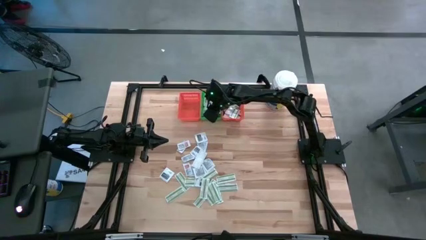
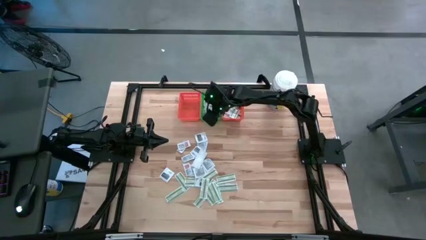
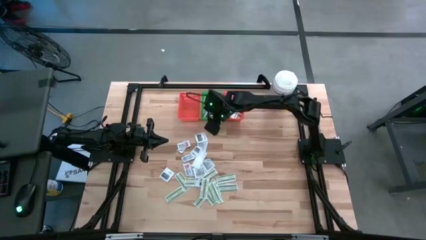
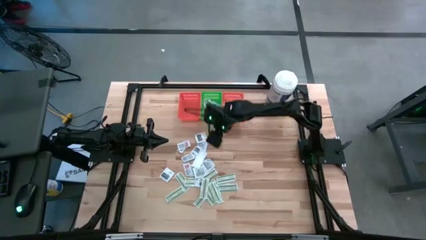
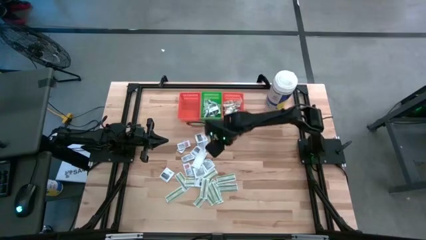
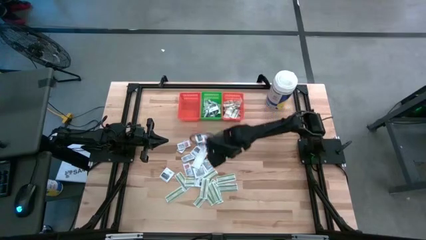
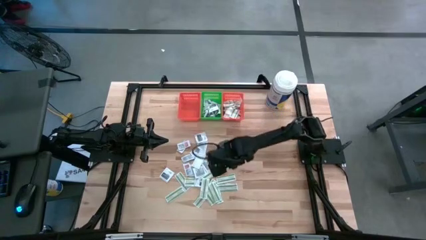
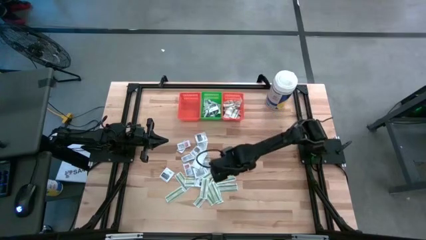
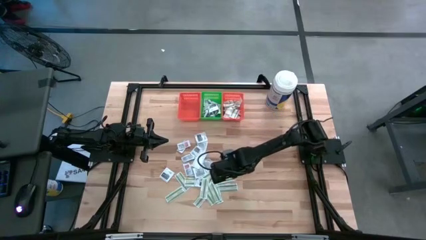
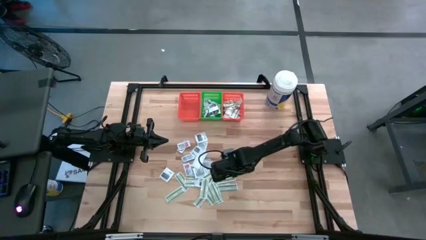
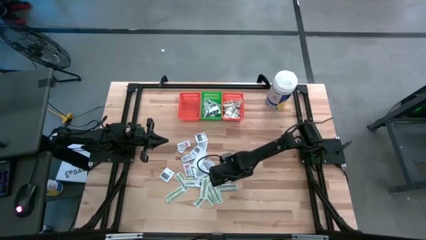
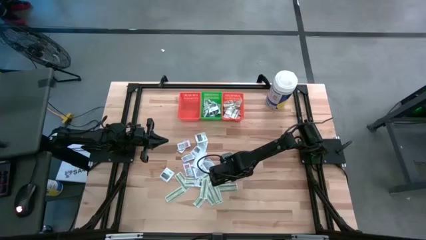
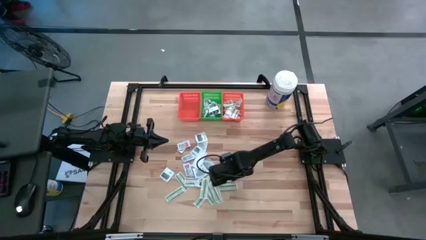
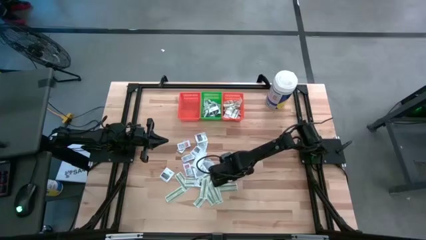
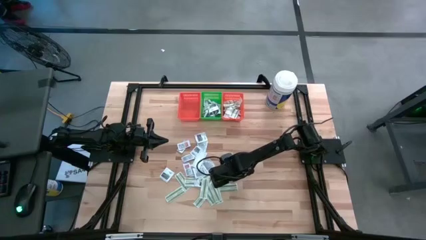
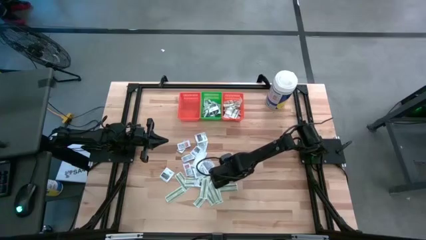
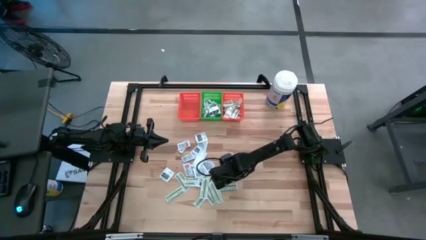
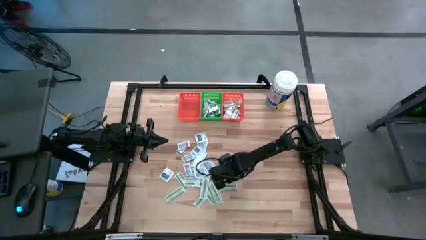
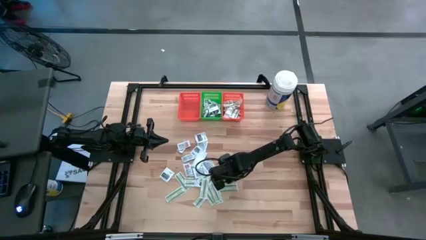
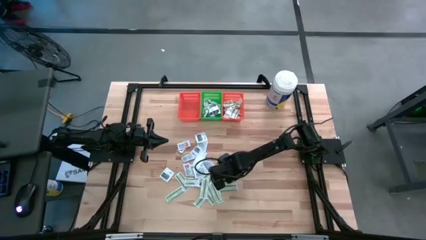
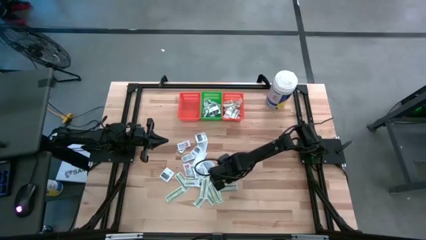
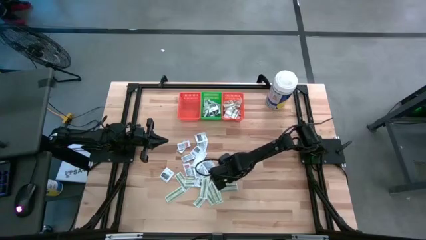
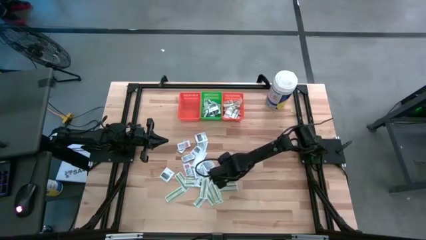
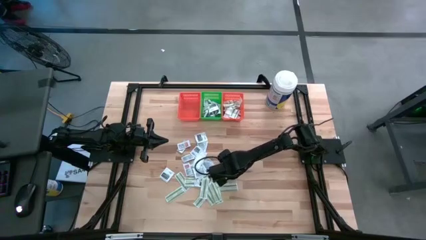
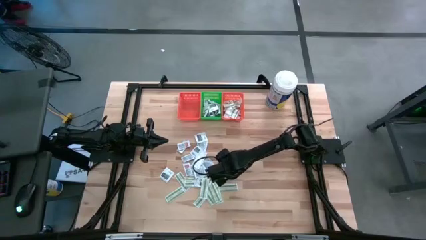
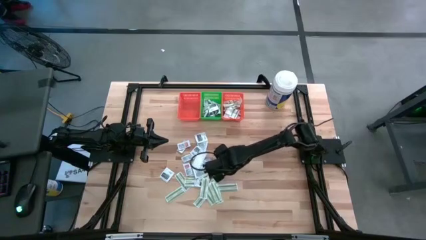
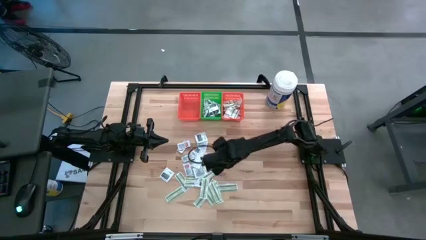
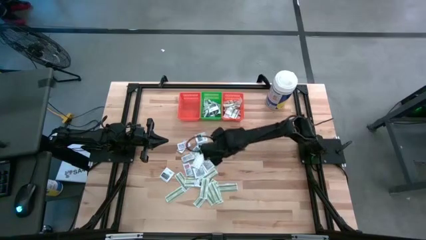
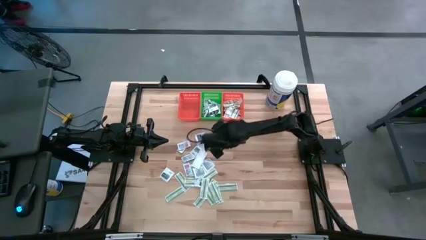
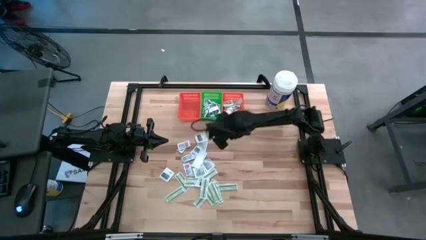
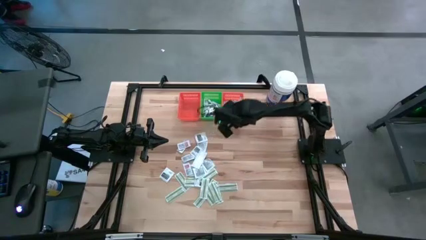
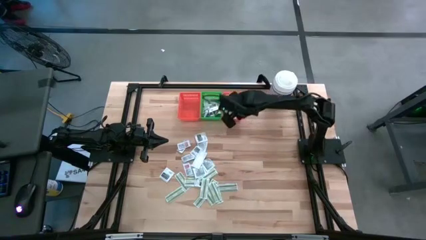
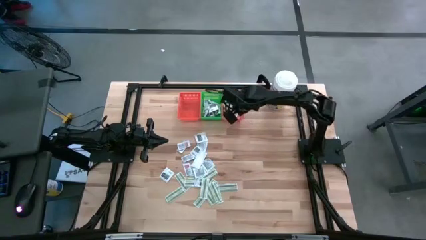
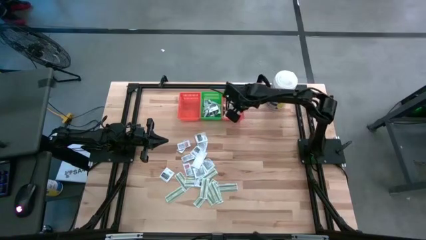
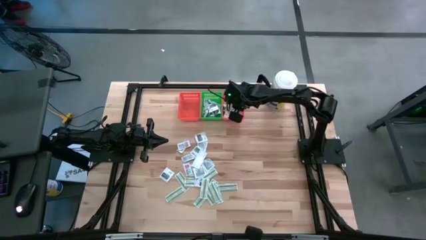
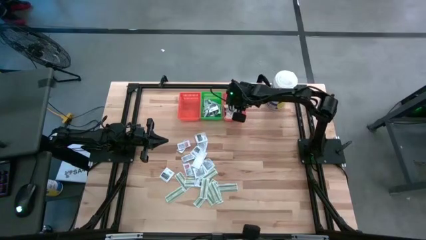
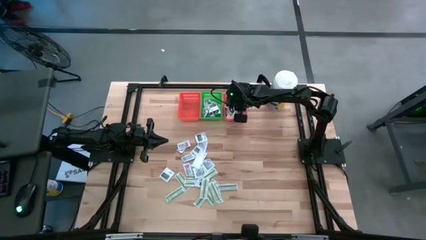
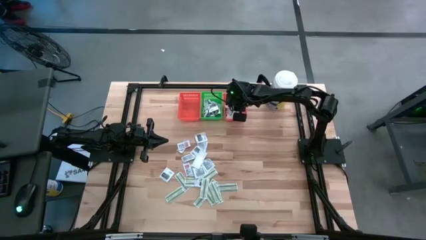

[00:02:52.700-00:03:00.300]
Task: Pick & Place First Aid Supplies
Put the bandage pack into the right orange bin

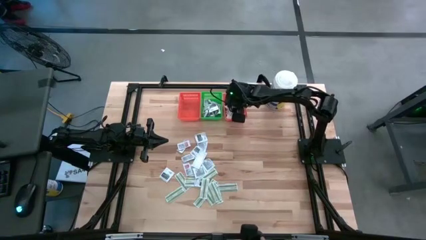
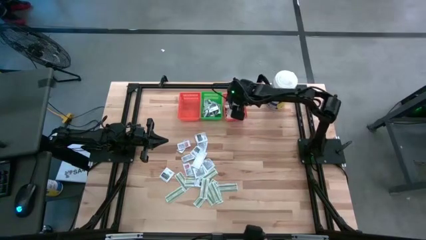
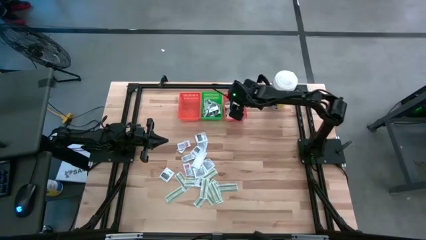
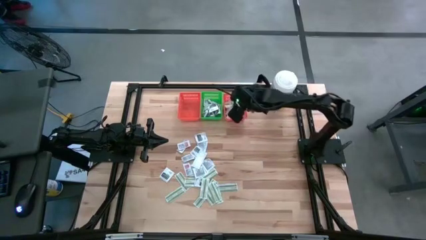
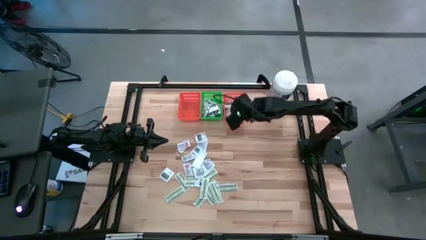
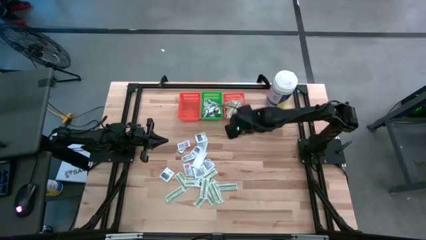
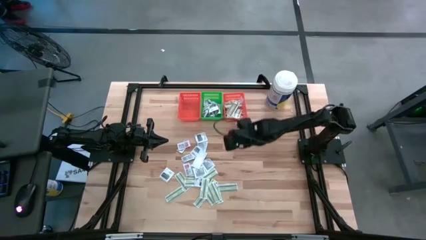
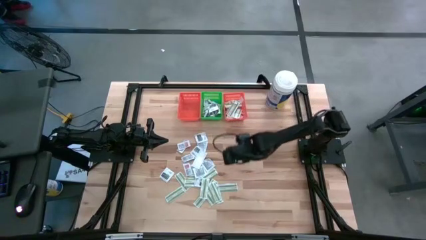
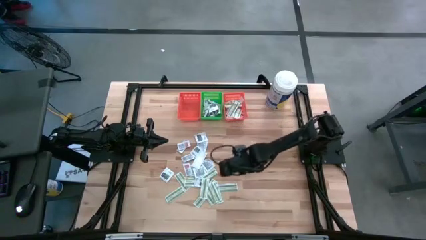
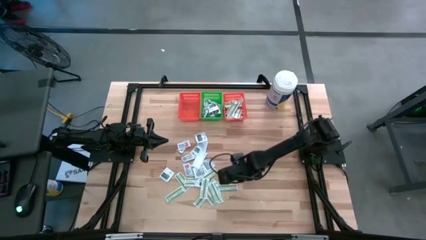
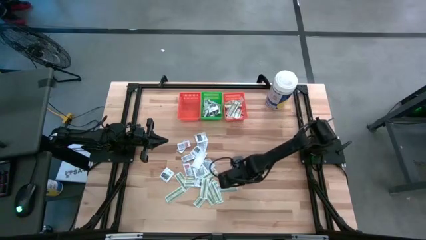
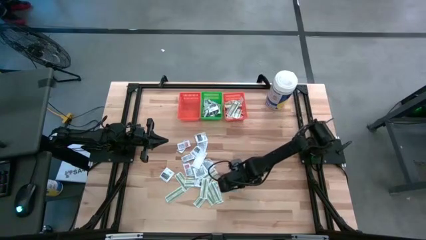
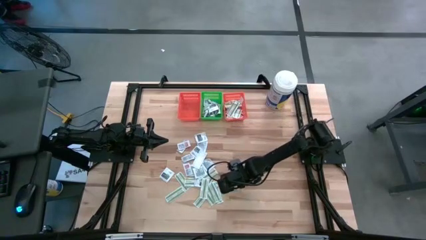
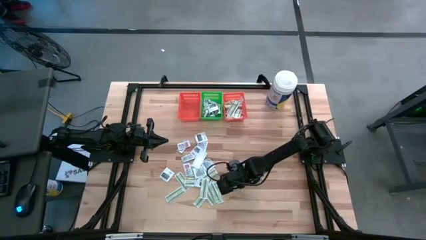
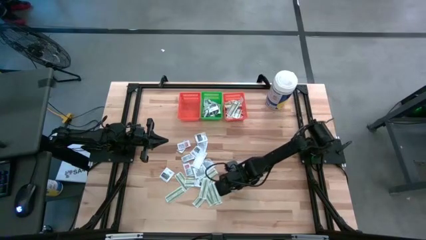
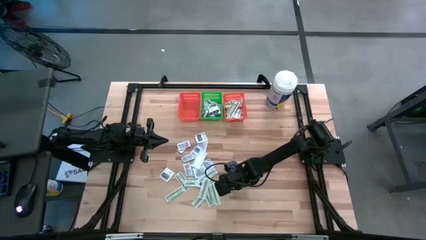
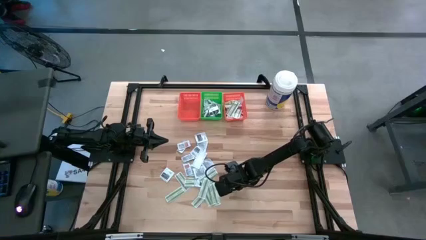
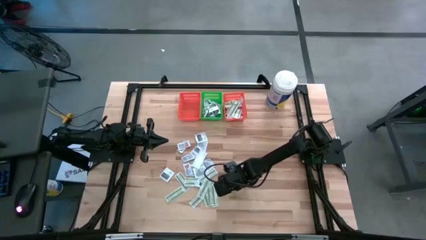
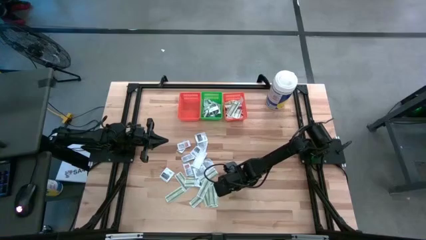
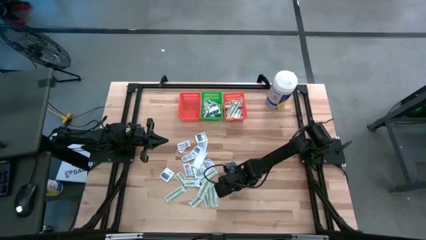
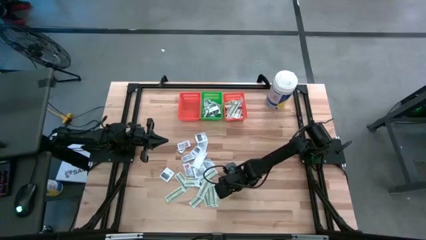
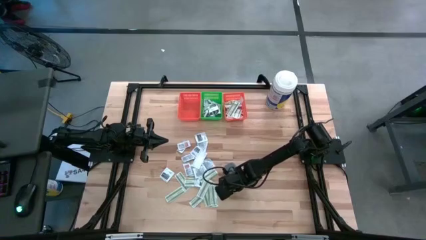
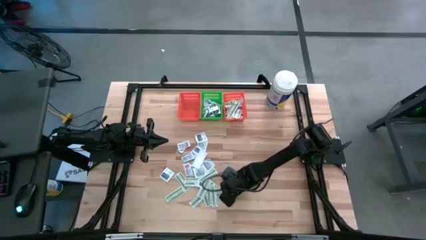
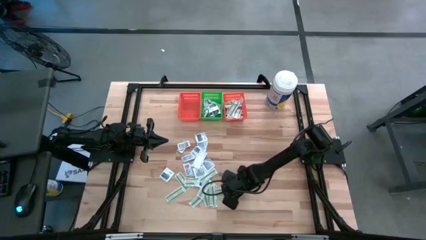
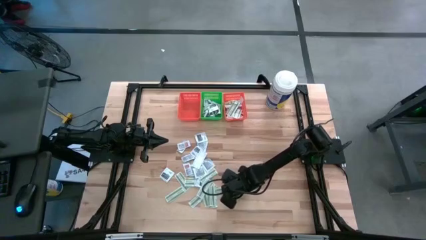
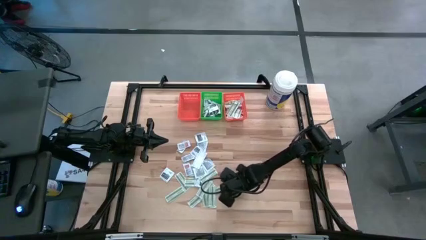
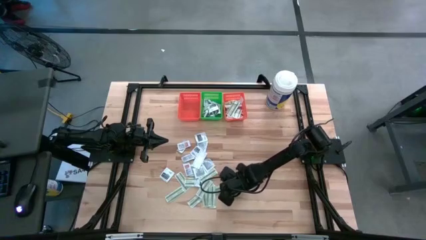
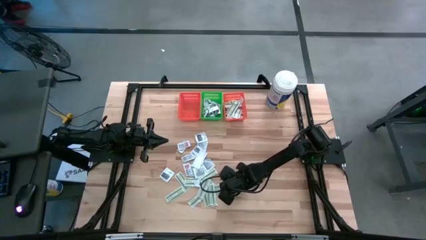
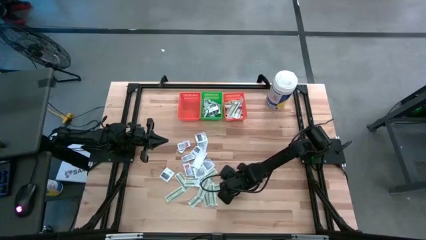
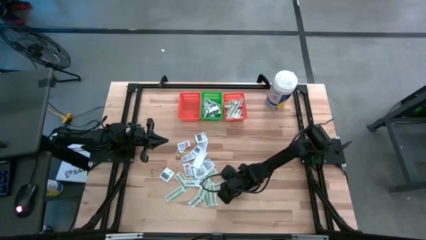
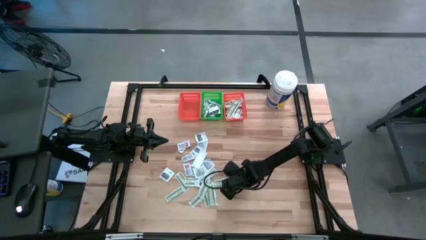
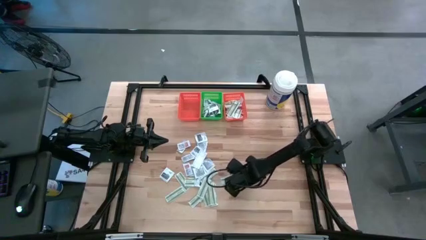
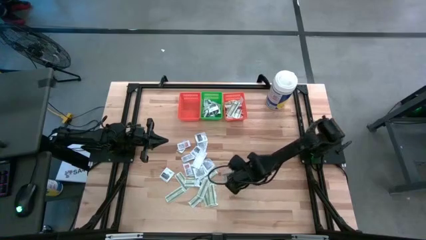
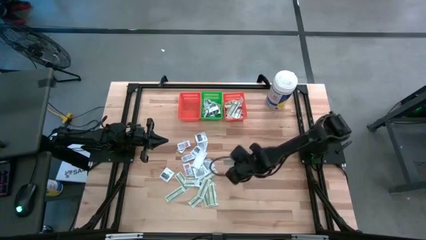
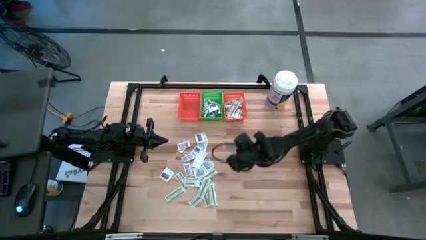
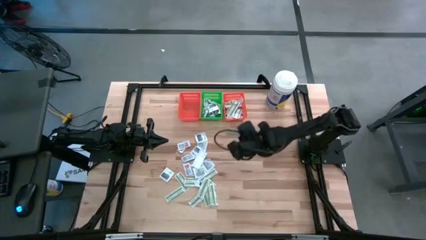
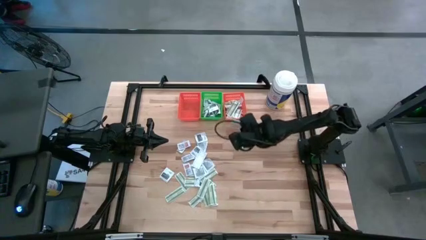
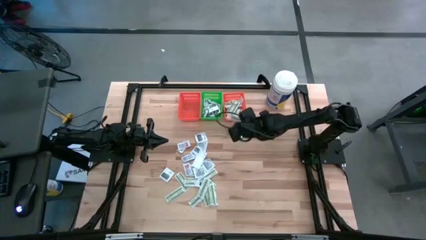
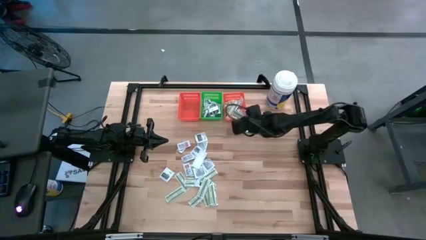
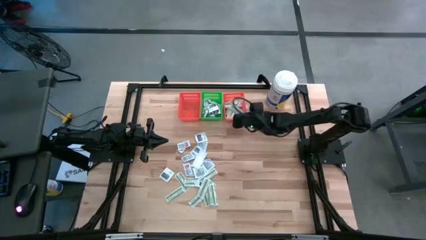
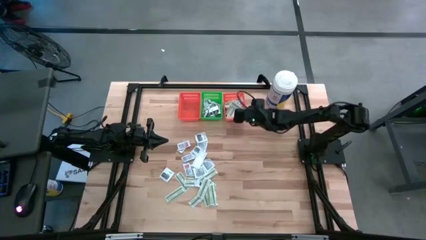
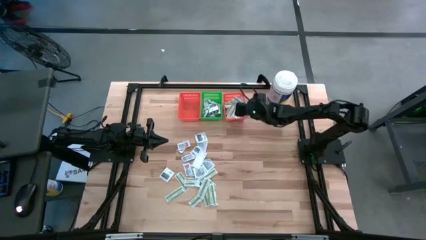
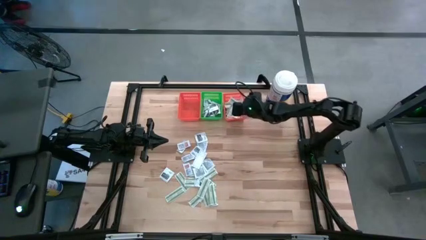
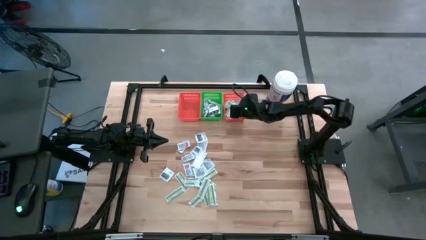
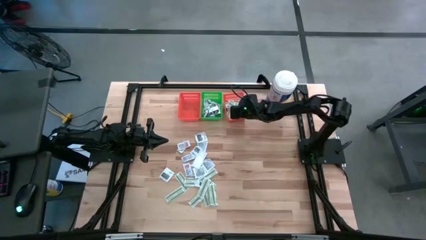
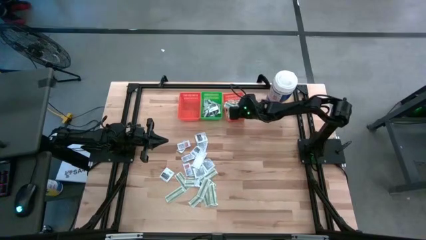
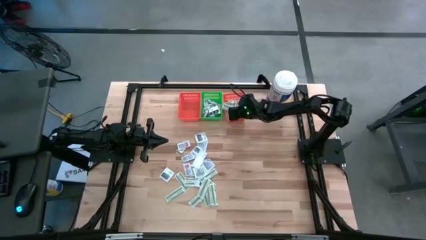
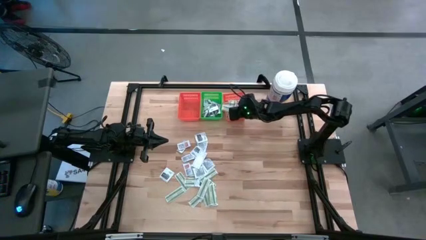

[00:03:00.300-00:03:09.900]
Put the bandage pack into the right orange bin
